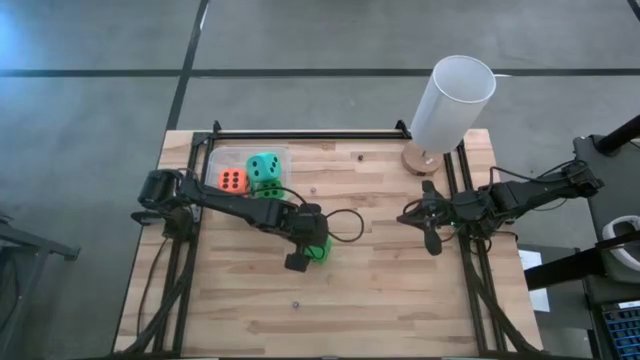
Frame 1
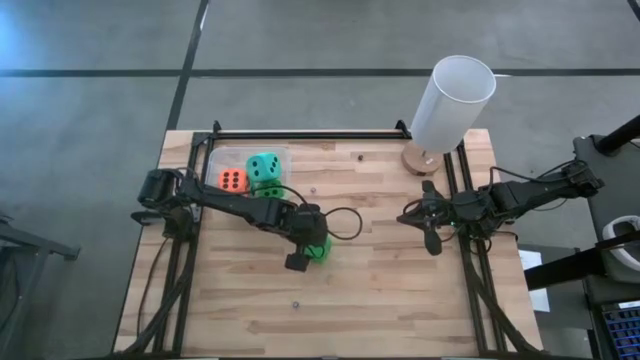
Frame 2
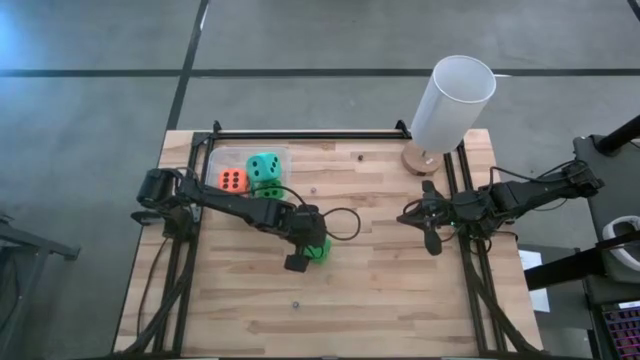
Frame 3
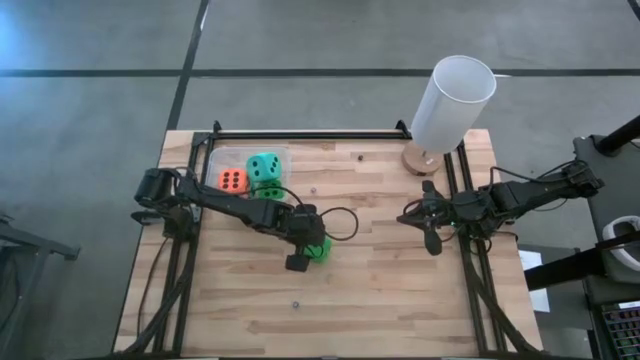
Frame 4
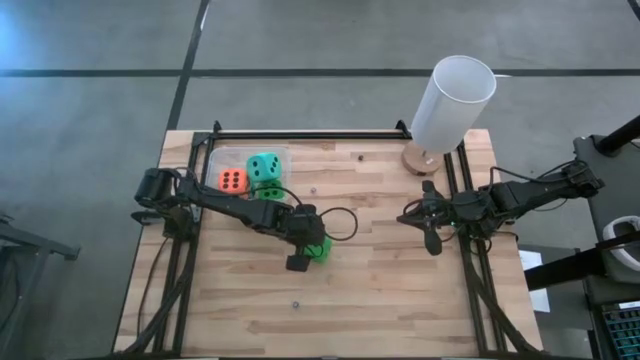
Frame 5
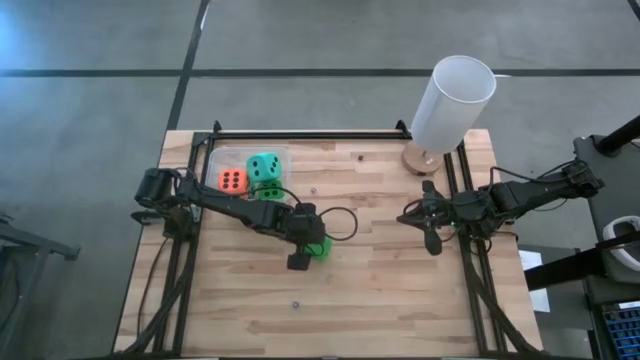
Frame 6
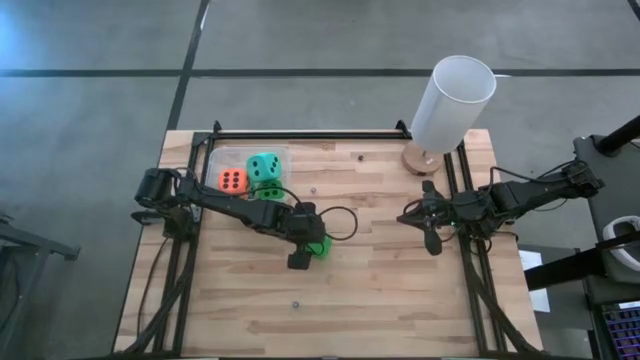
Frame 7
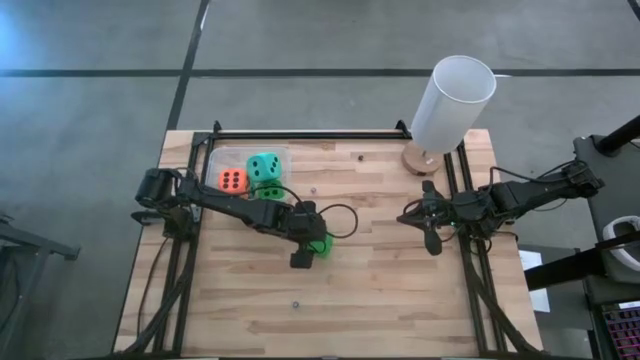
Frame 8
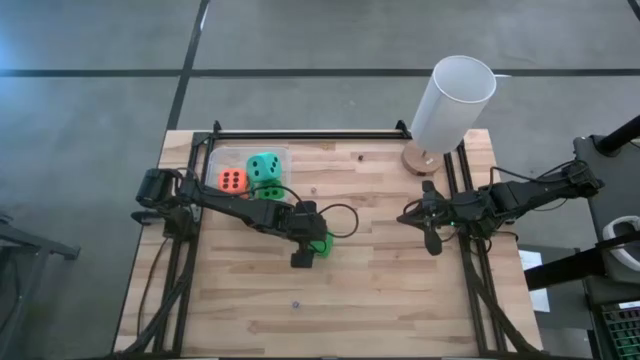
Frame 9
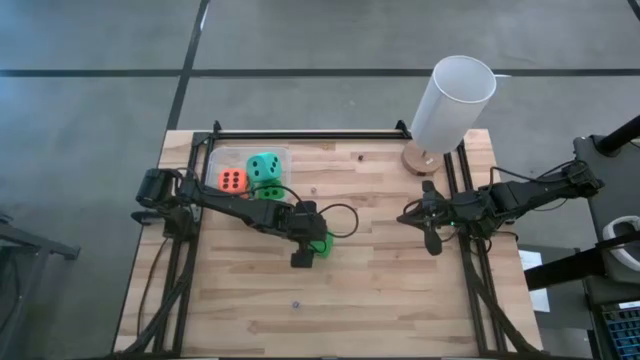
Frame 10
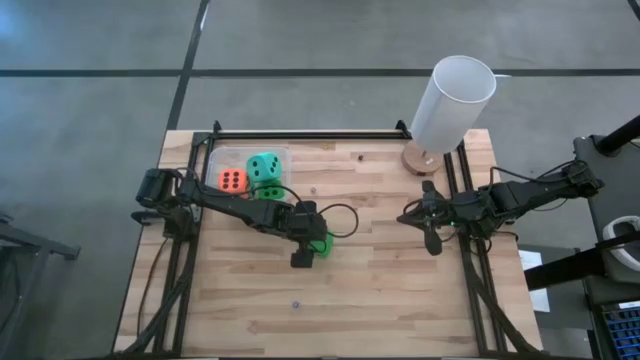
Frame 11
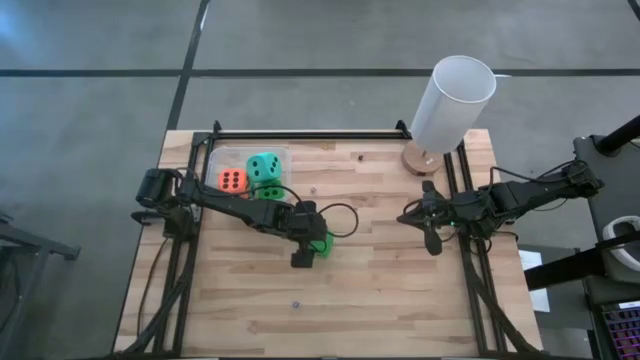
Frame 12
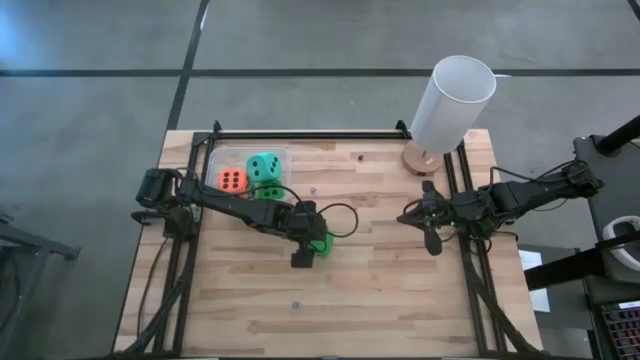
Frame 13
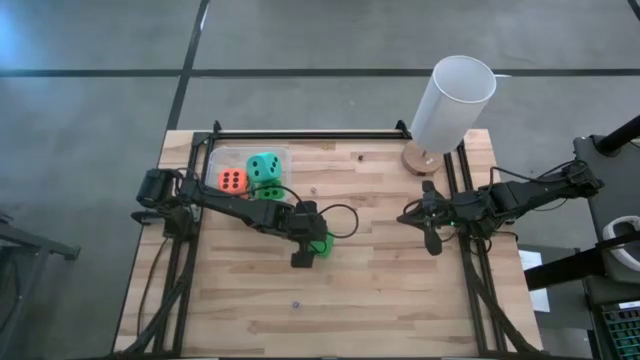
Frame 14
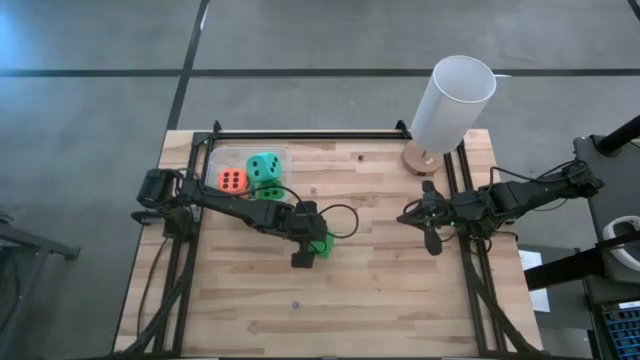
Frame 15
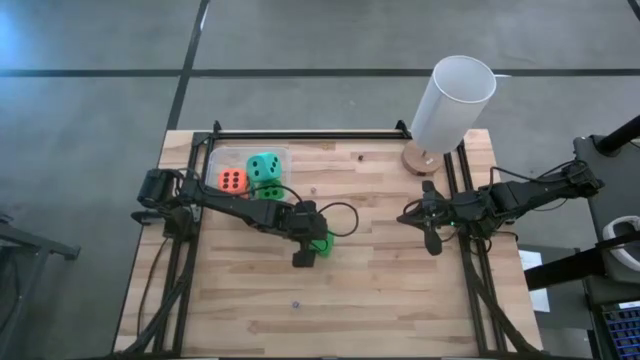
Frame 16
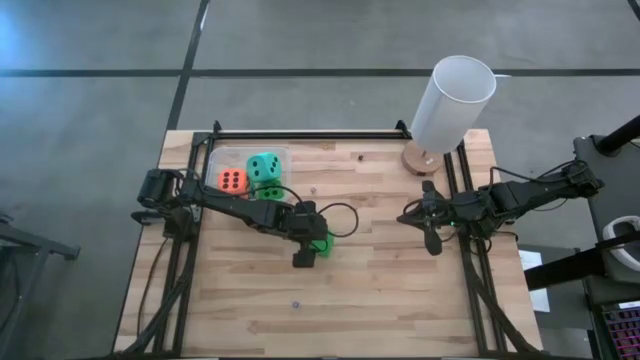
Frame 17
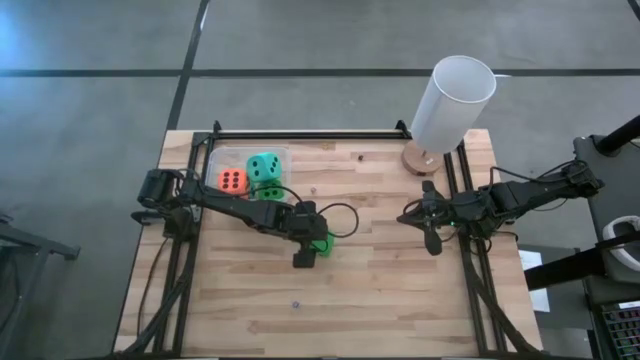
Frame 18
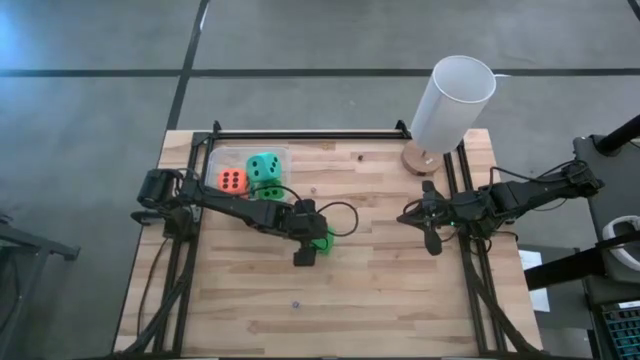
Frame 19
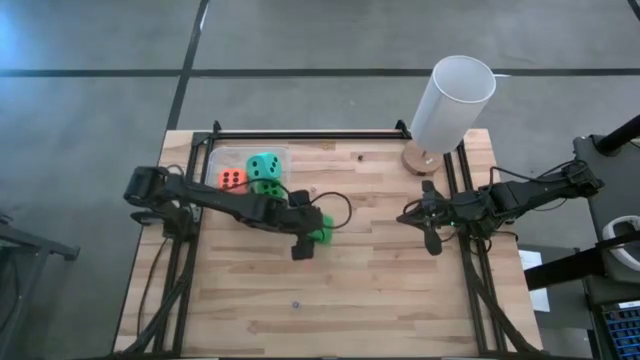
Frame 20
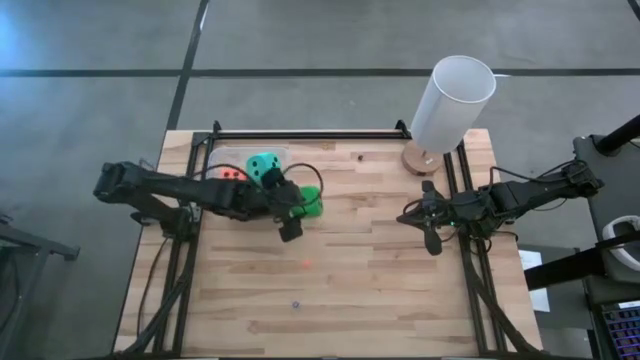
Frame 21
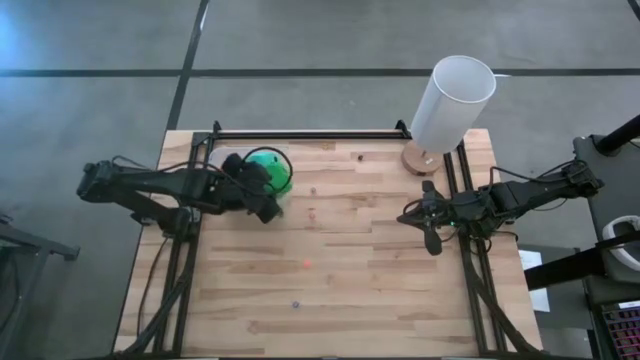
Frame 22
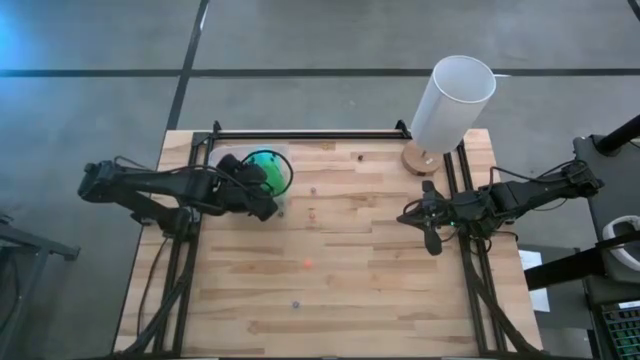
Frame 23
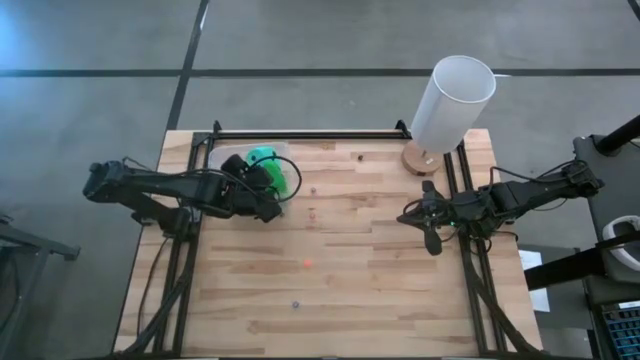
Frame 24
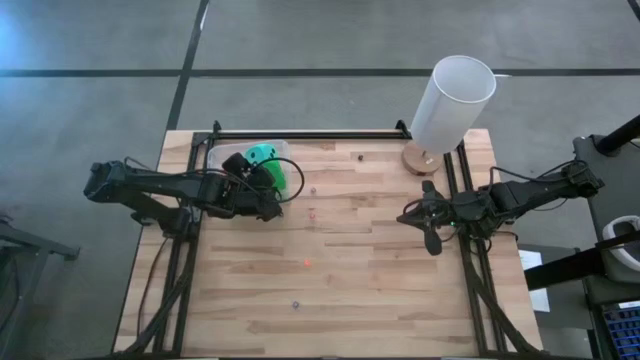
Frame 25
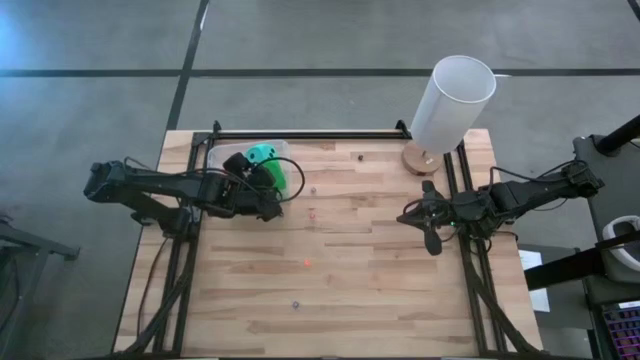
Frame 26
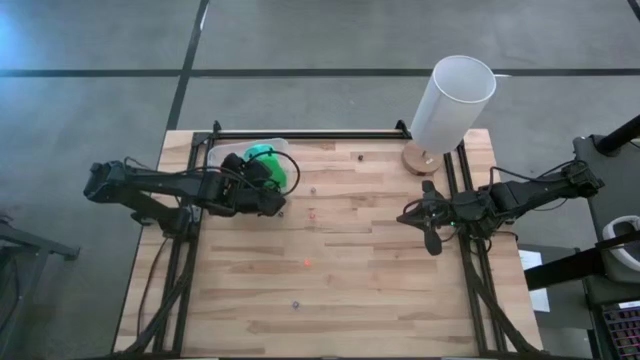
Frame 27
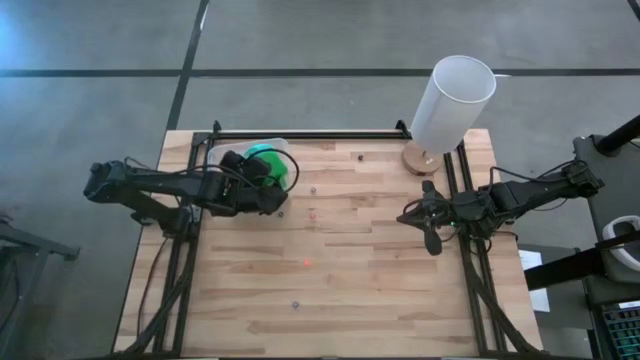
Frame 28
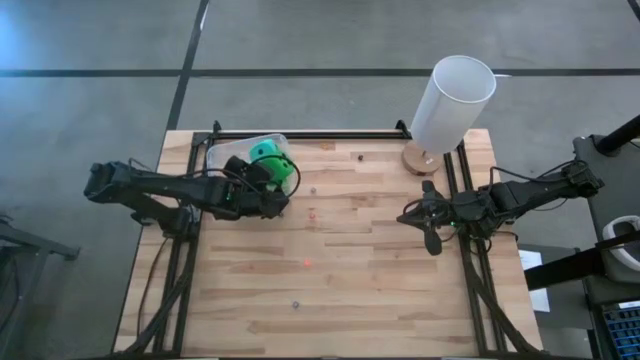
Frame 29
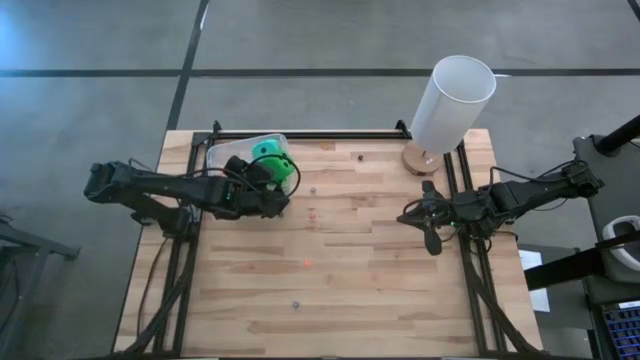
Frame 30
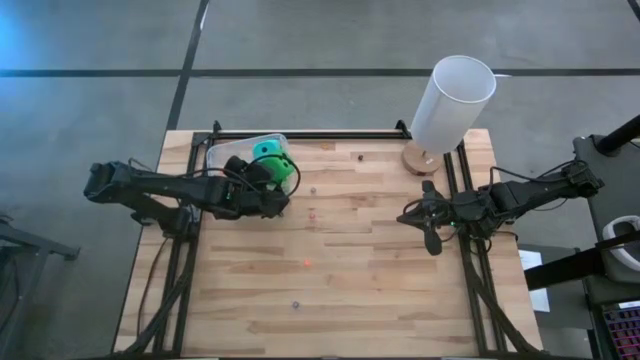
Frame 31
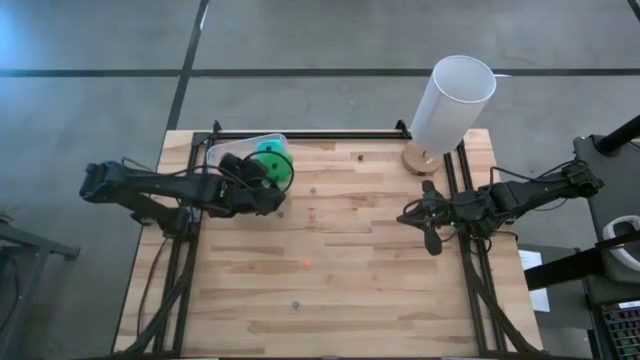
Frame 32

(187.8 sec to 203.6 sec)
Task: Pick & Place Dice
Put the green large dice into the transparent bin

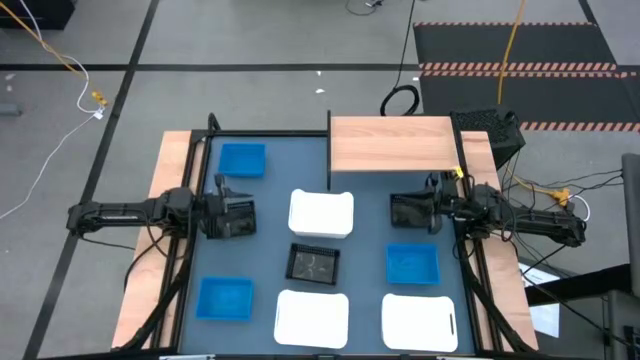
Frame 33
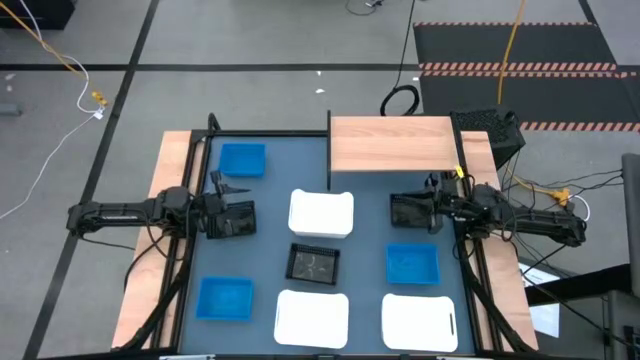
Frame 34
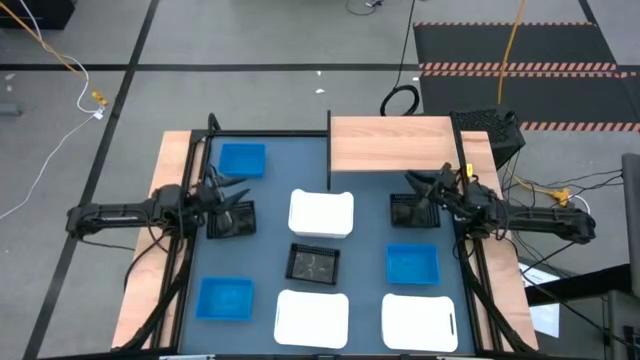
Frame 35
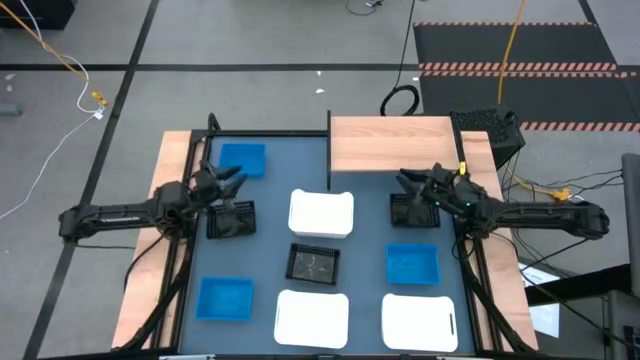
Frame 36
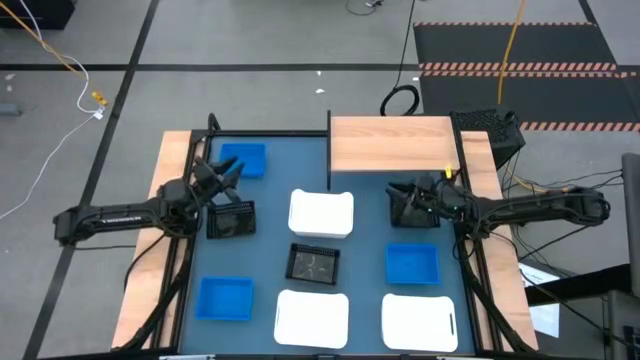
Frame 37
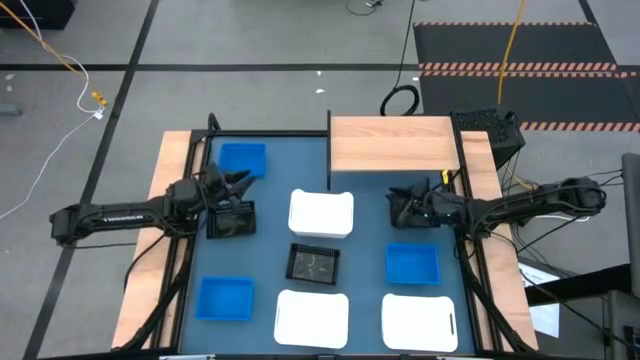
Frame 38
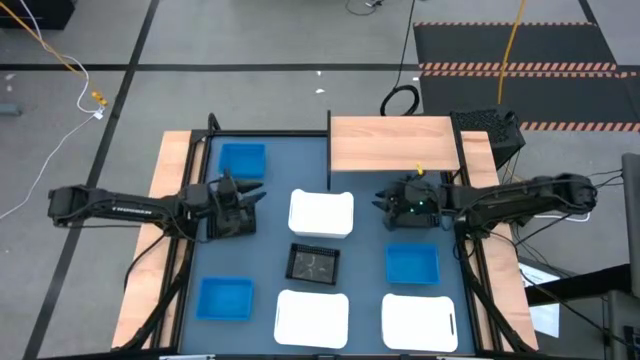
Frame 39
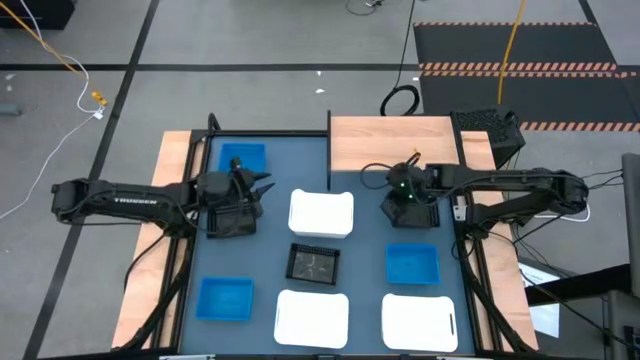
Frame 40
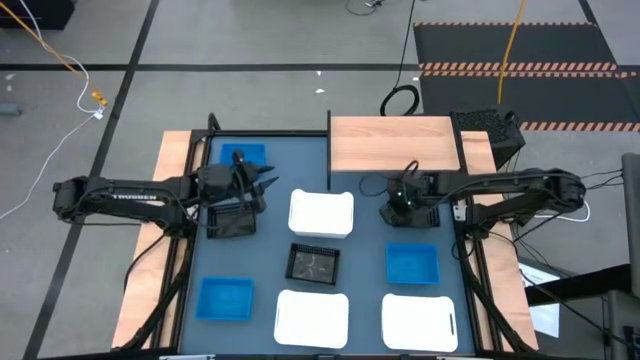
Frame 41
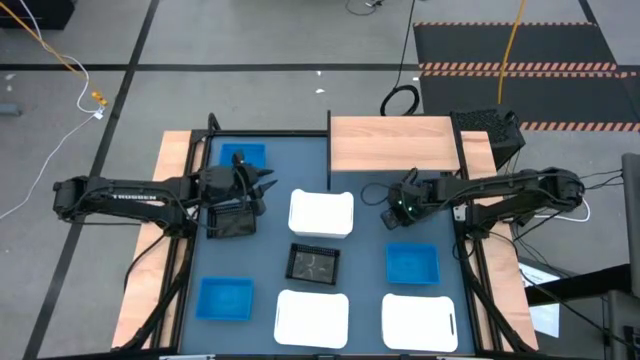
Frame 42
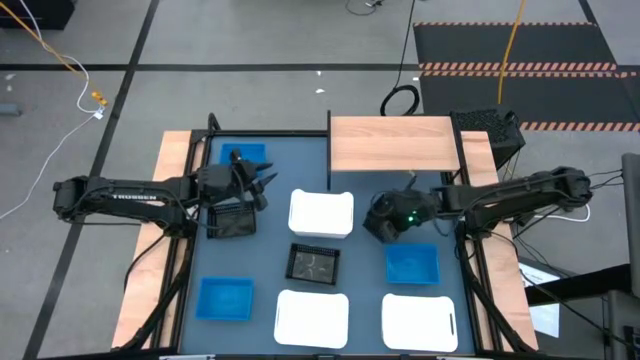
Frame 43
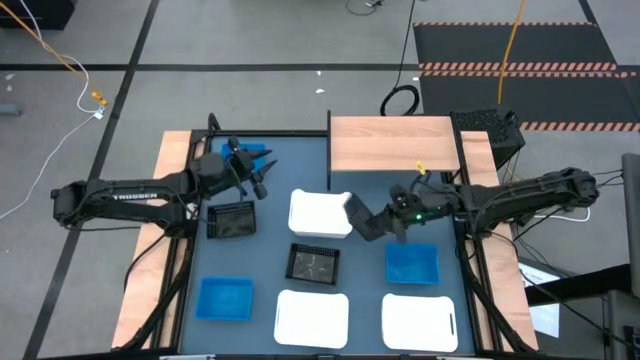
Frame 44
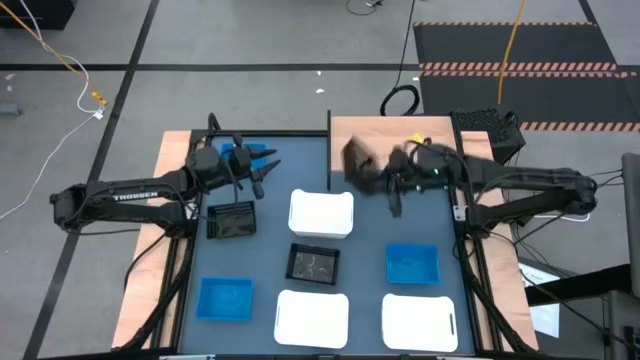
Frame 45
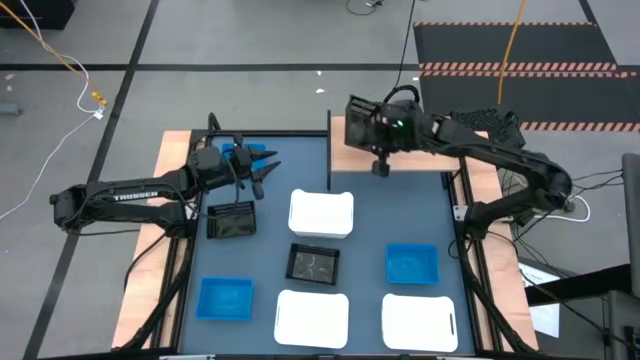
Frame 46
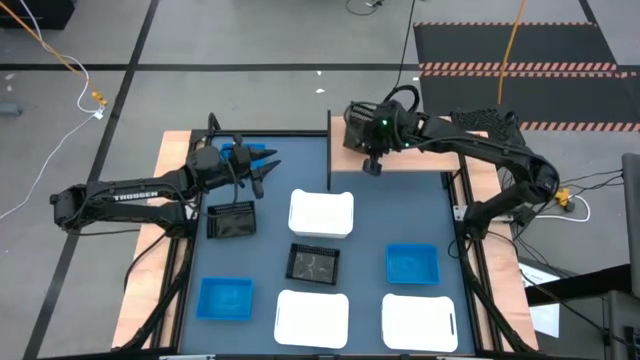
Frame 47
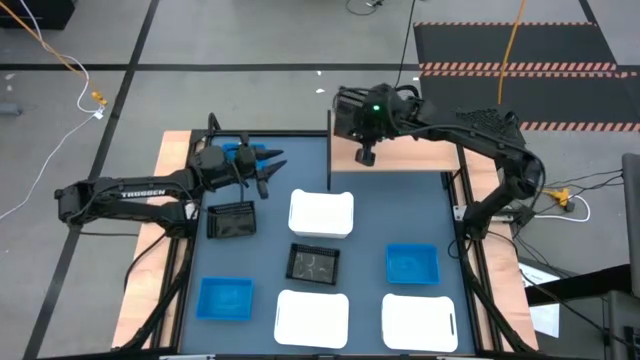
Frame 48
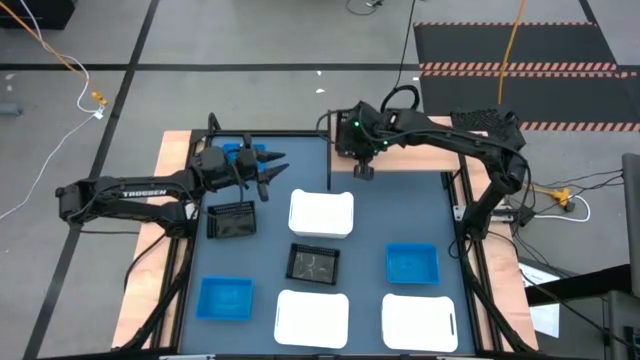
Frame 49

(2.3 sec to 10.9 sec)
Task: Stack baskets on shelf by color
Put the top right black bin into the shelf
